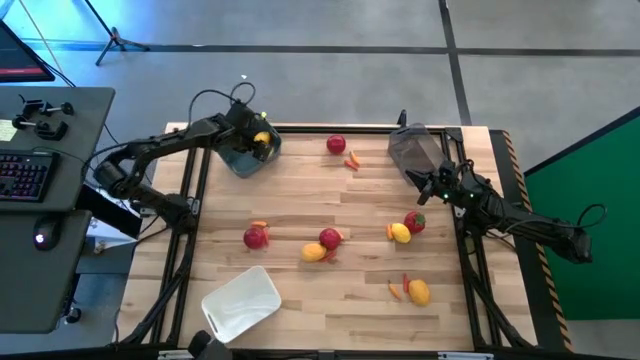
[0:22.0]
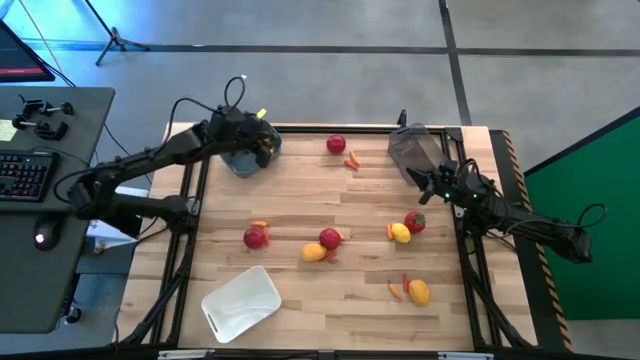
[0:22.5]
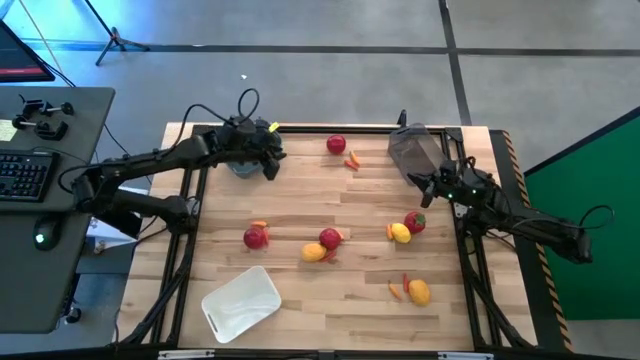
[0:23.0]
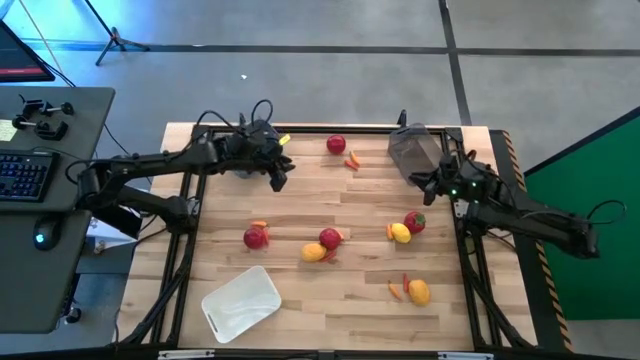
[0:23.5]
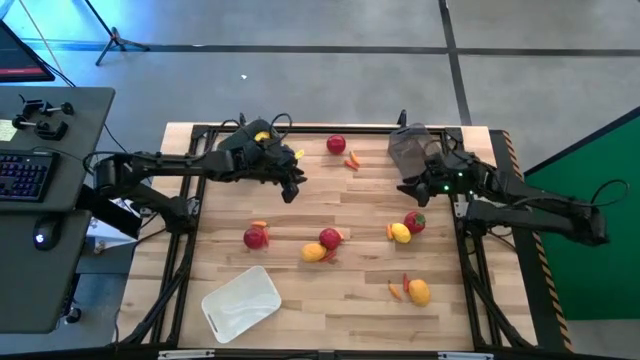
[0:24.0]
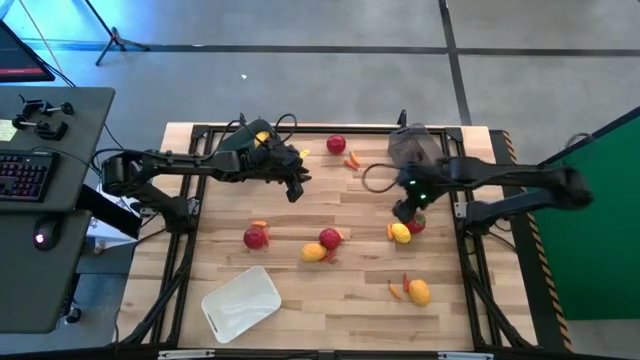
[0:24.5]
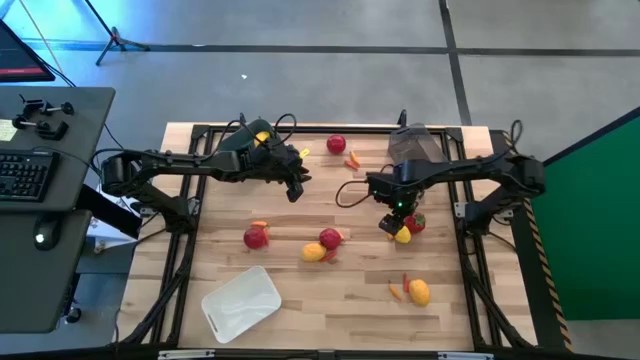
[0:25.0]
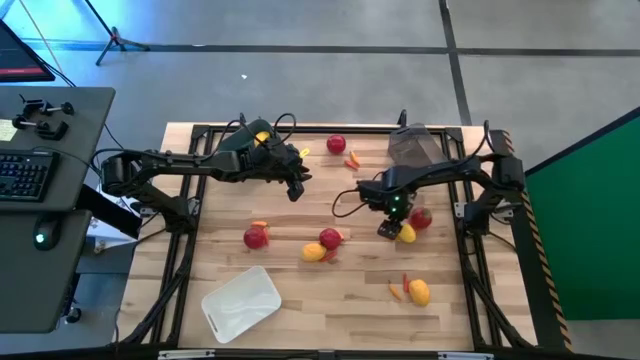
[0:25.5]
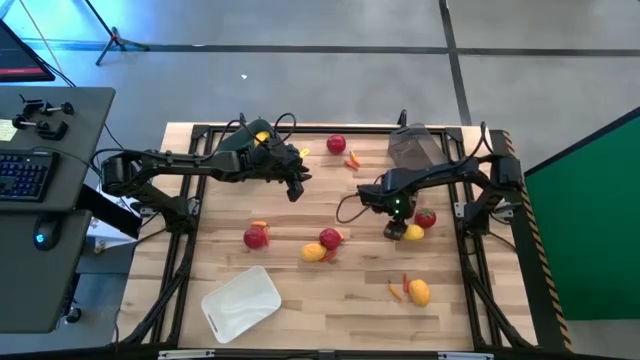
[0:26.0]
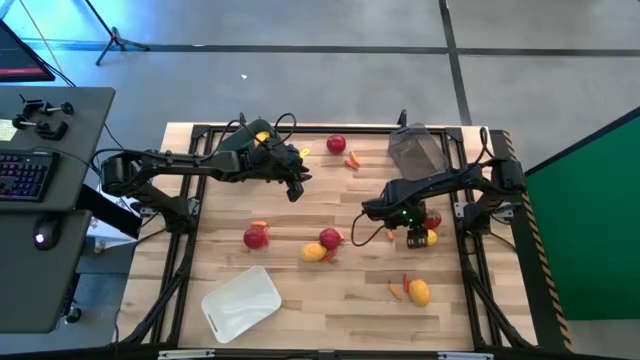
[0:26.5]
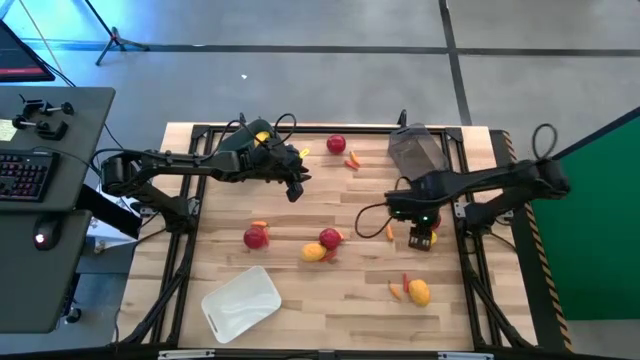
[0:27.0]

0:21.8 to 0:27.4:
Task: Sort produce into baskets
Put the yellow lemon into the blue bin

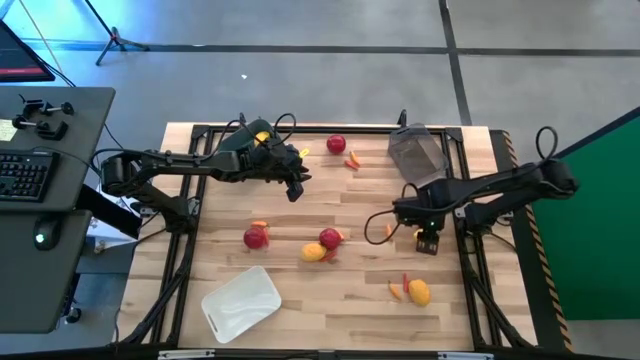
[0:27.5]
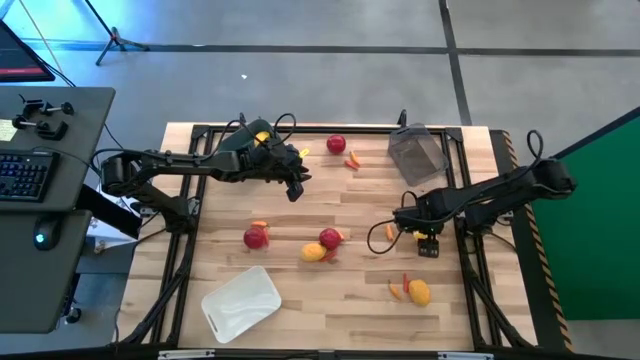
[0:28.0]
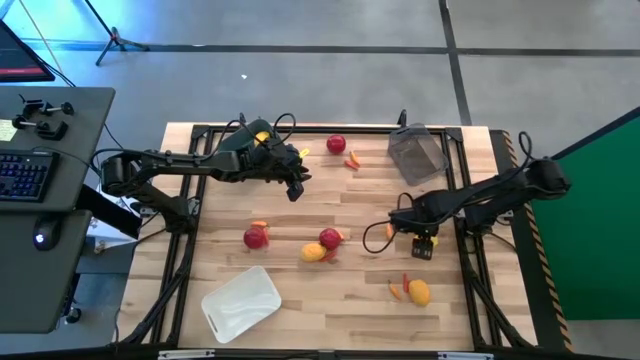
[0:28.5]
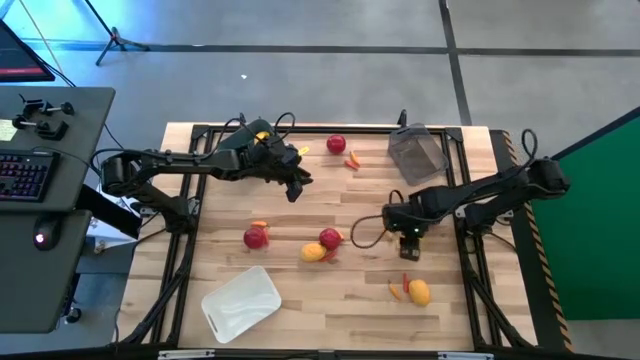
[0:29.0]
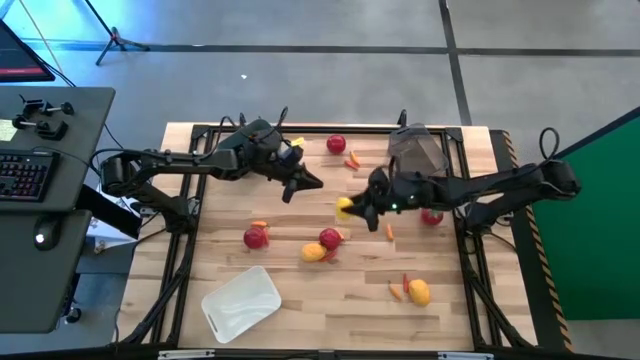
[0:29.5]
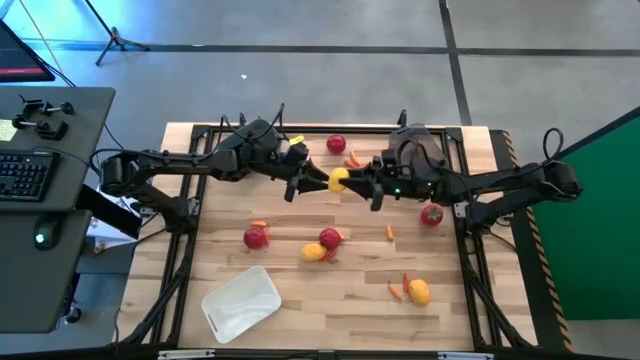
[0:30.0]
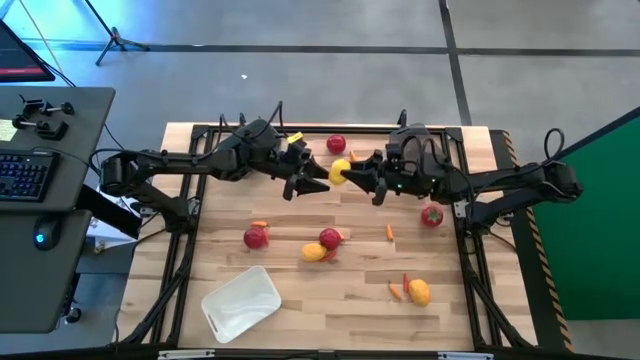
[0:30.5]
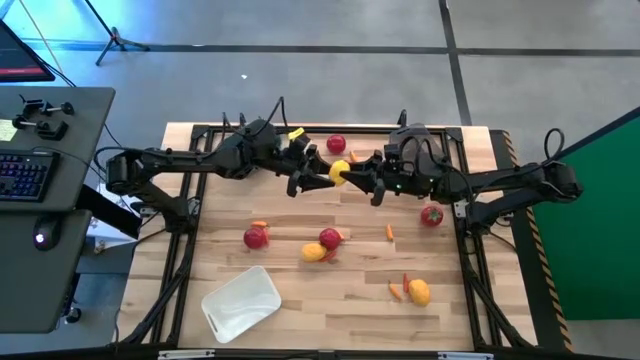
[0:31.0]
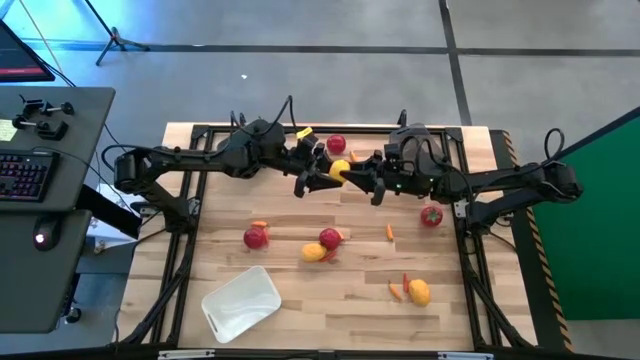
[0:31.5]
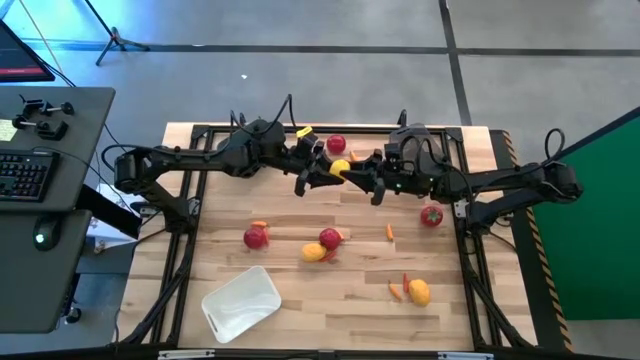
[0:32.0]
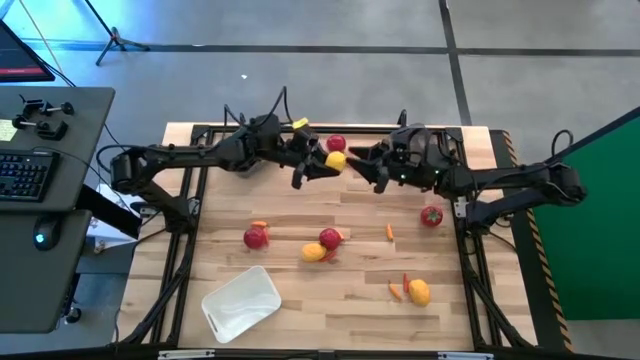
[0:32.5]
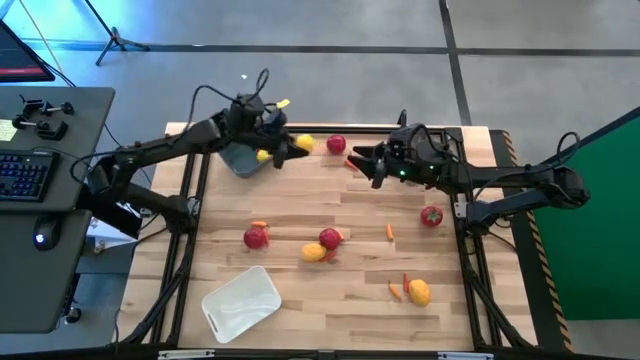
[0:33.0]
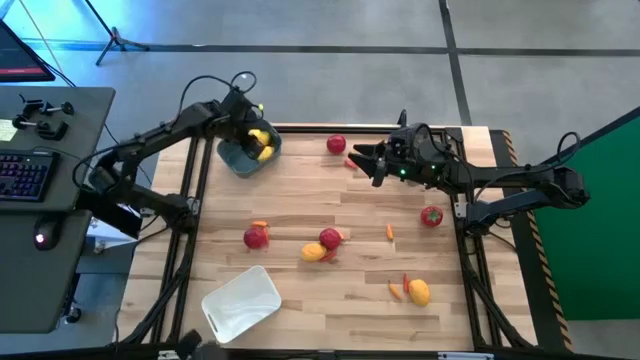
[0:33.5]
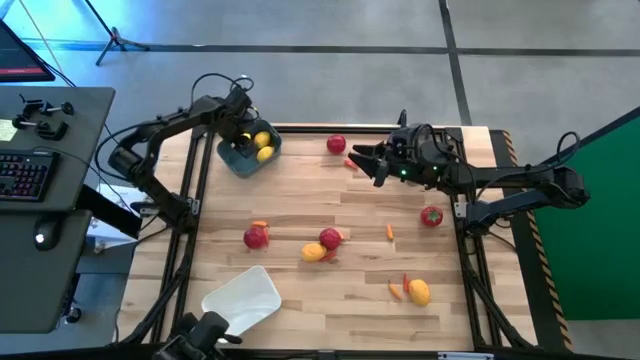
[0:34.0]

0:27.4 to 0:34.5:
Put the yellow lemon into the blue bin

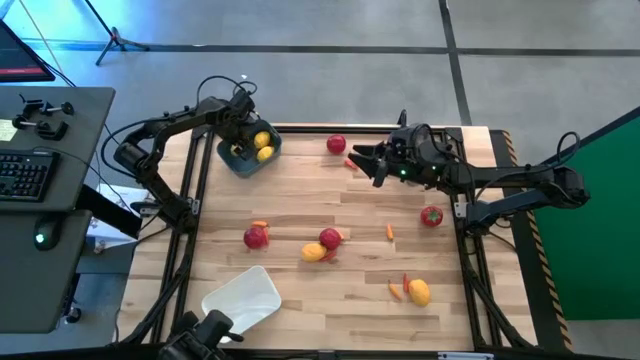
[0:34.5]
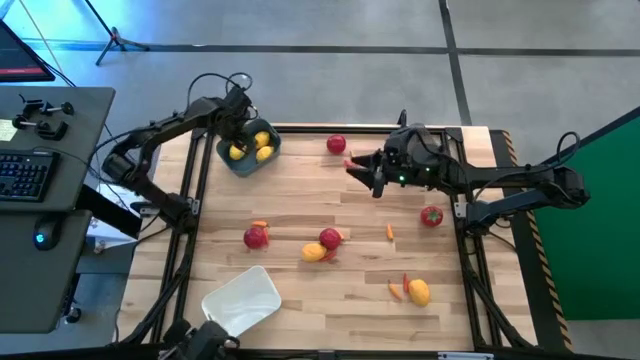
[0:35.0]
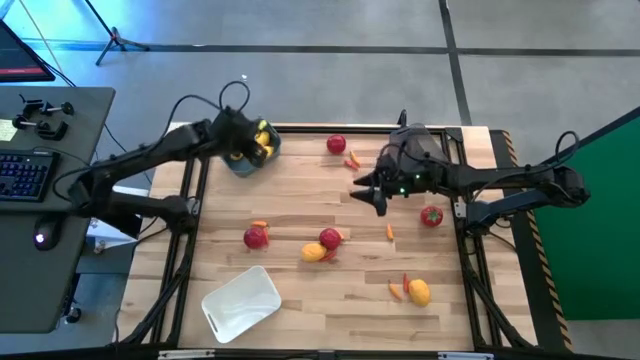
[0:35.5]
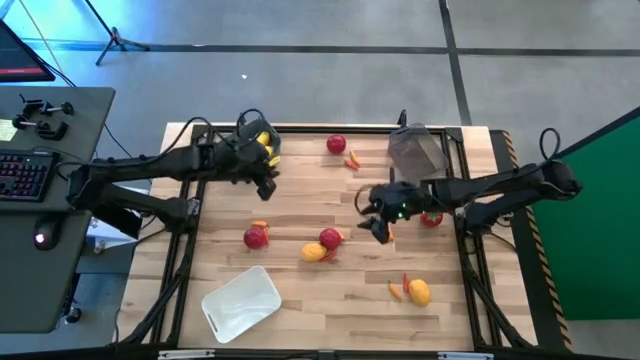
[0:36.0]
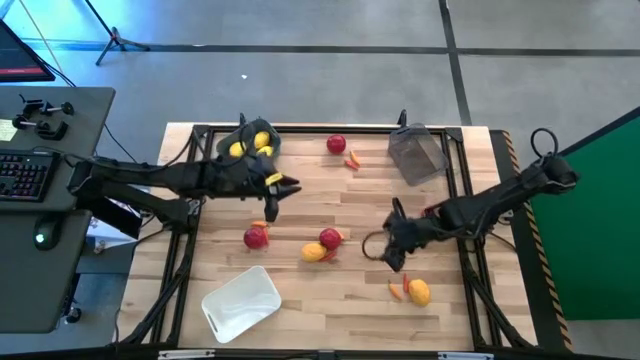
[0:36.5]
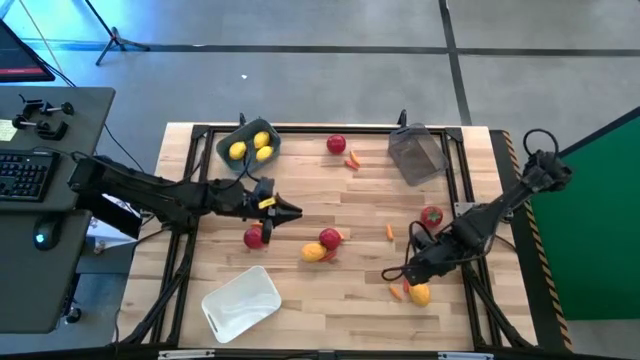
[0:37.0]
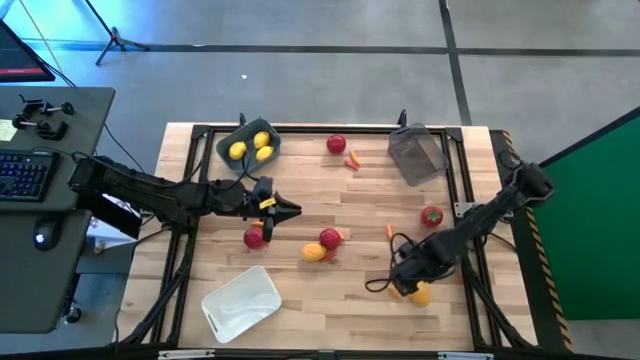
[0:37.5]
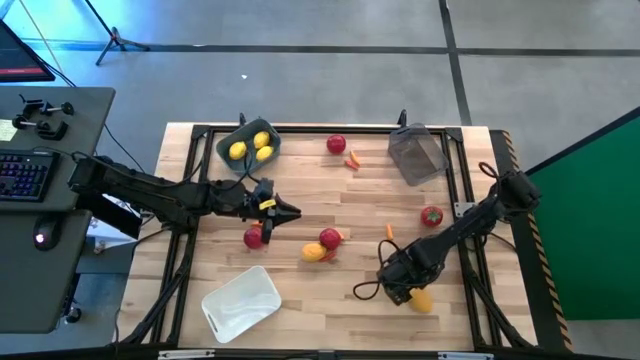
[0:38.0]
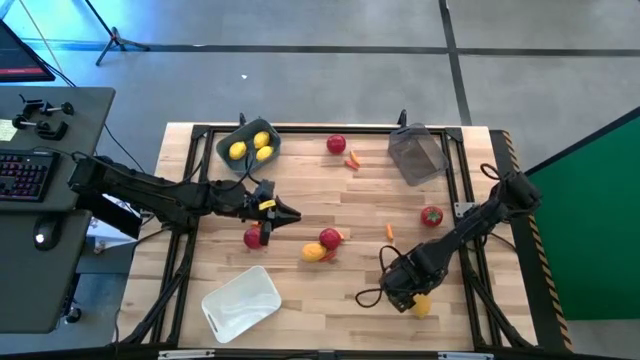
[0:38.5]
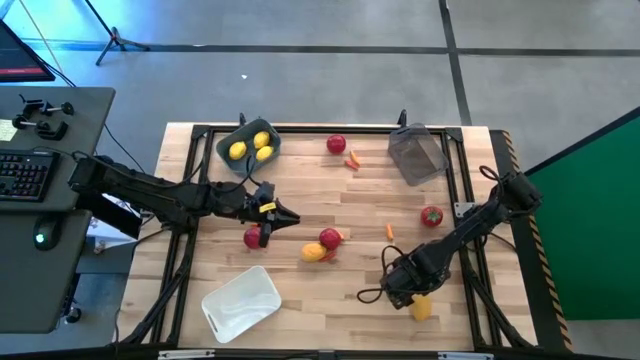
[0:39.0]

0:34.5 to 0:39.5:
Put the yellow lemon into the blue bin

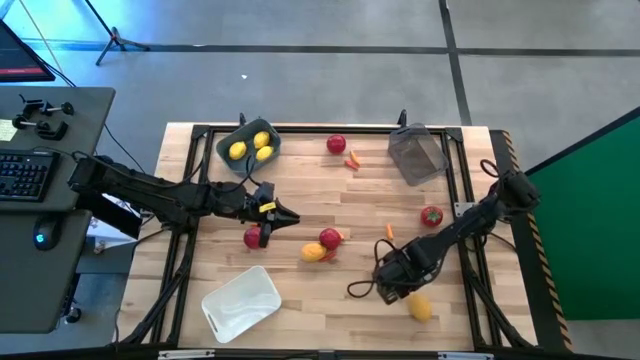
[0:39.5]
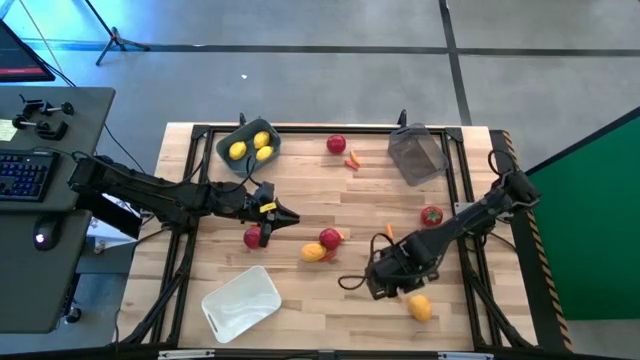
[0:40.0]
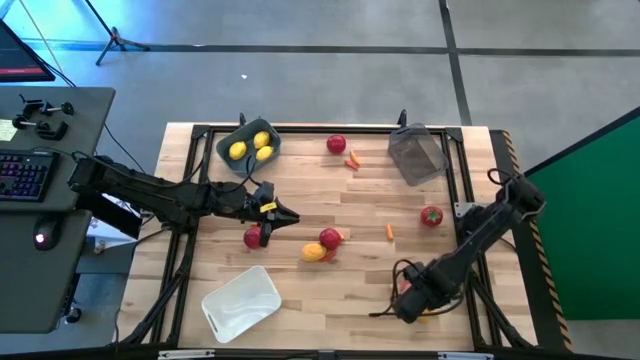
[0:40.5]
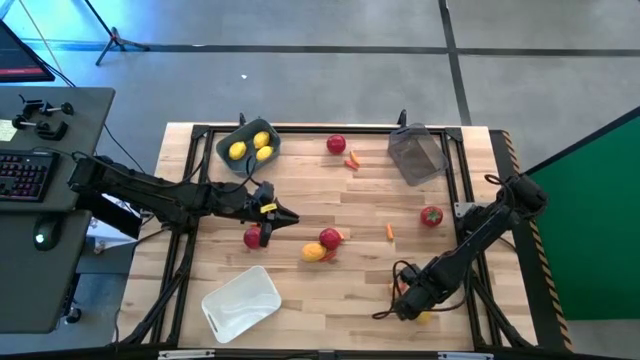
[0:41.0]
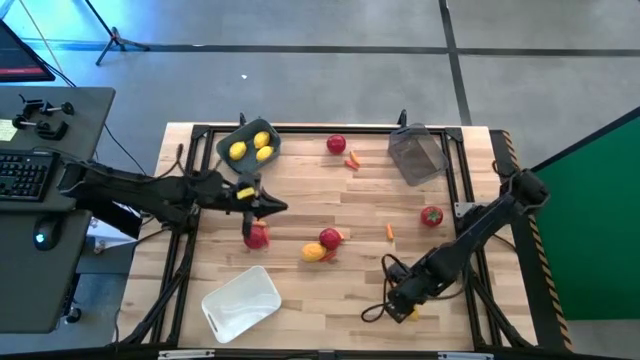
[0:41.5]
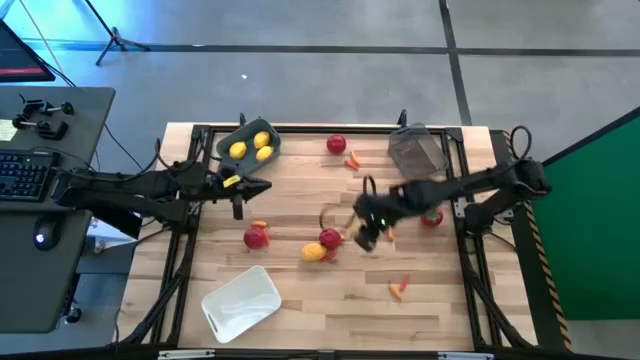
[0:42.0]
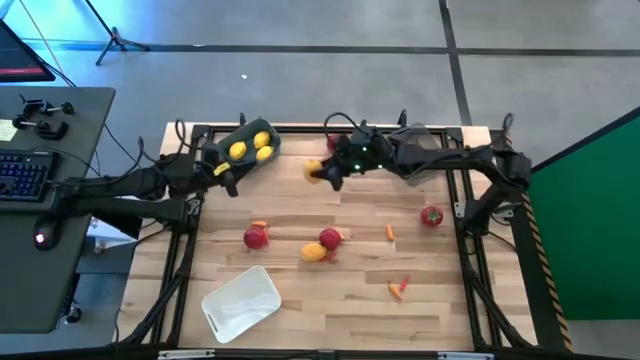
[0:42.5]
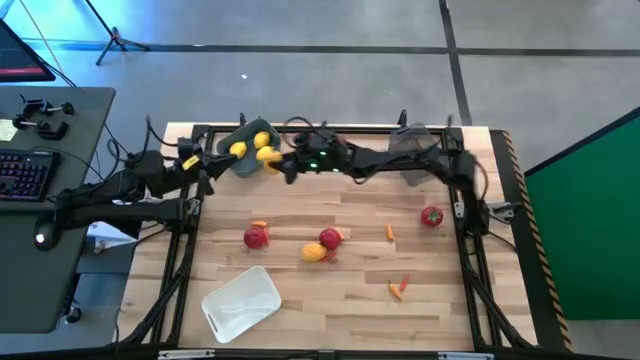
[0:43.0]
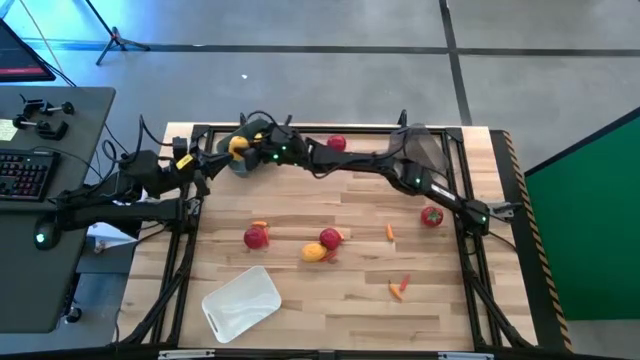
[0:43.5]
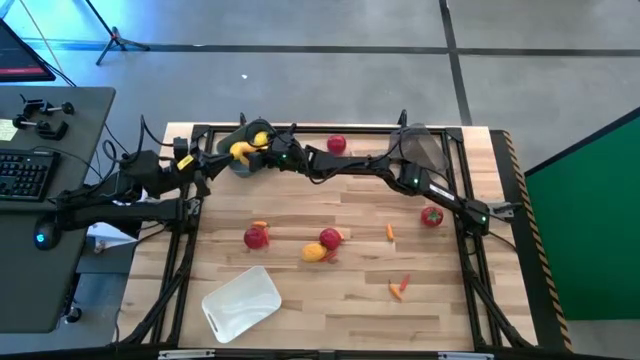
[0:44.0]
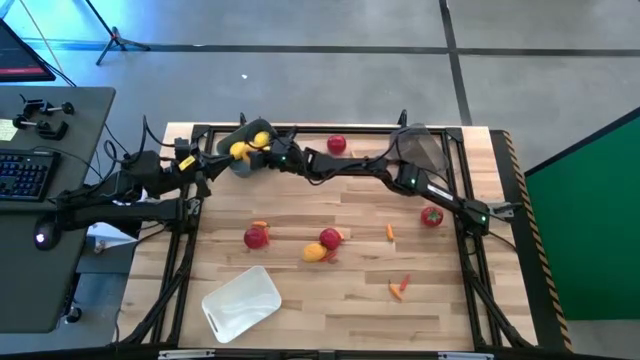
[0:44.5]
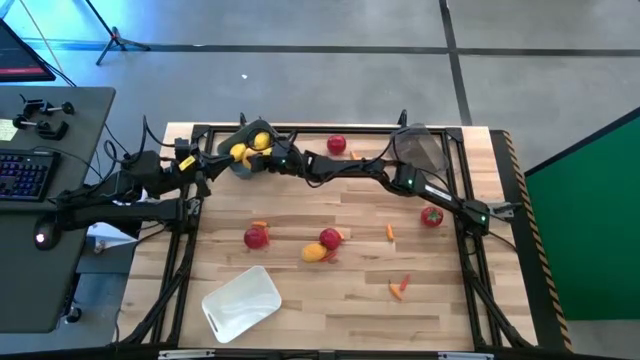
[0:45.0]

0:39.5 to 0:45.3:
Put the yellow lemon into the blue bin
